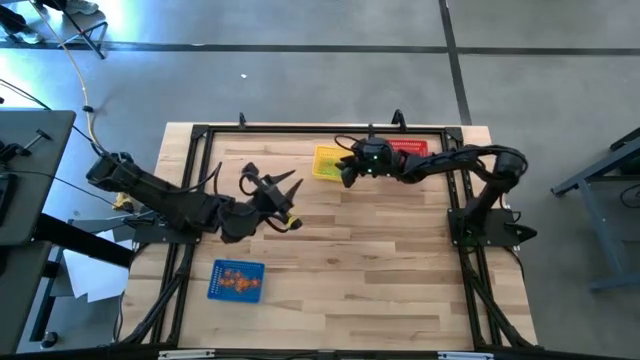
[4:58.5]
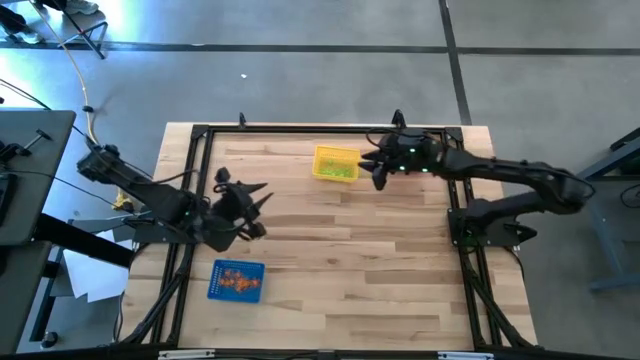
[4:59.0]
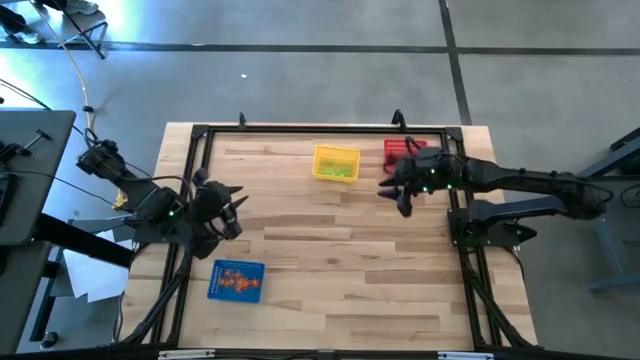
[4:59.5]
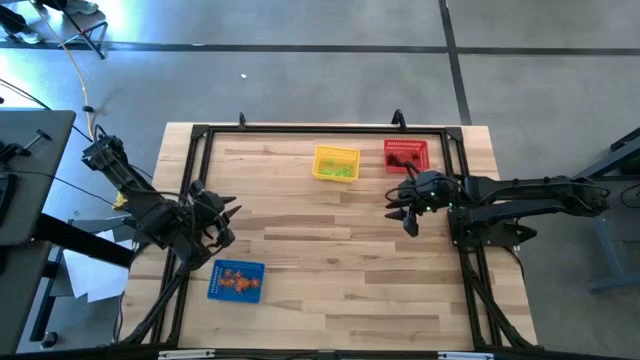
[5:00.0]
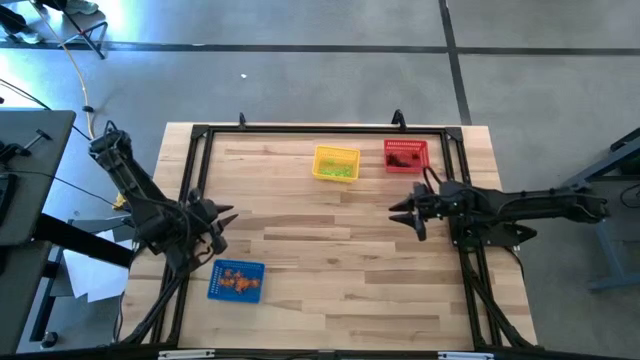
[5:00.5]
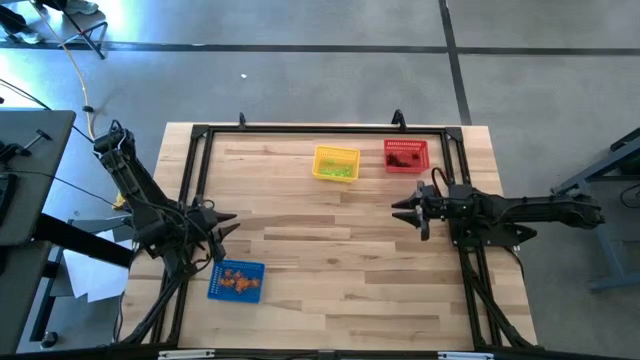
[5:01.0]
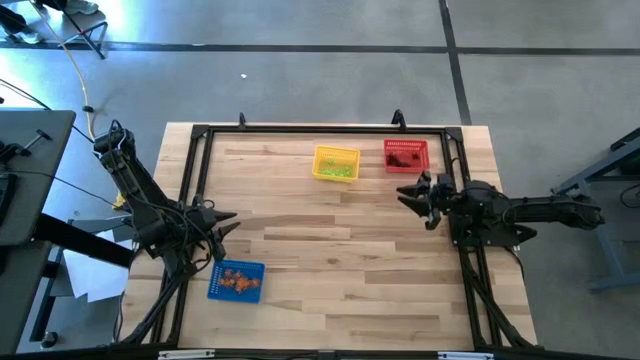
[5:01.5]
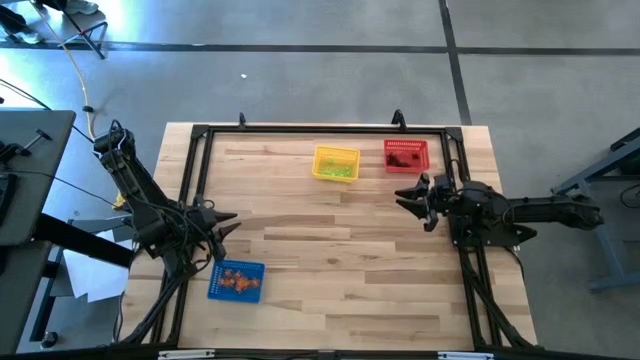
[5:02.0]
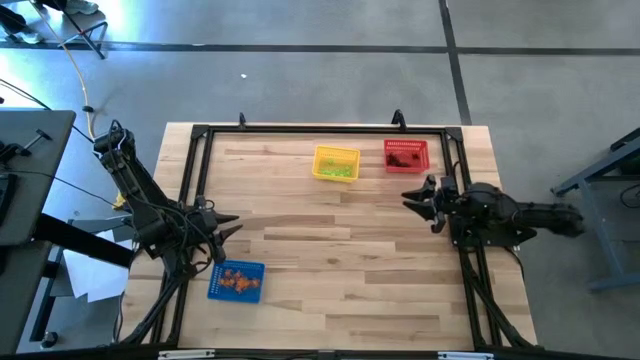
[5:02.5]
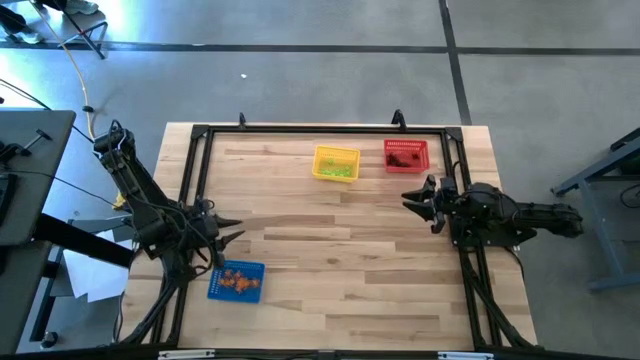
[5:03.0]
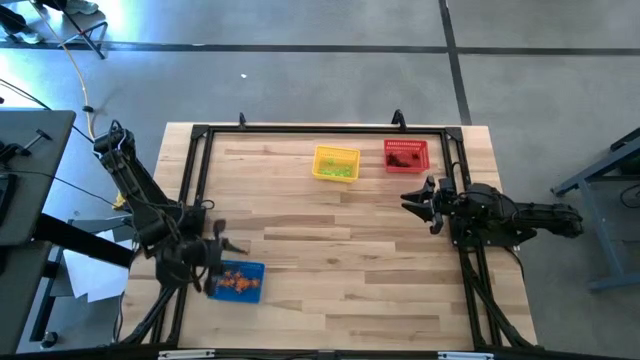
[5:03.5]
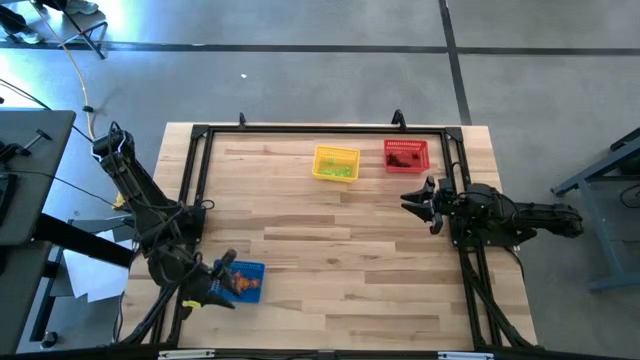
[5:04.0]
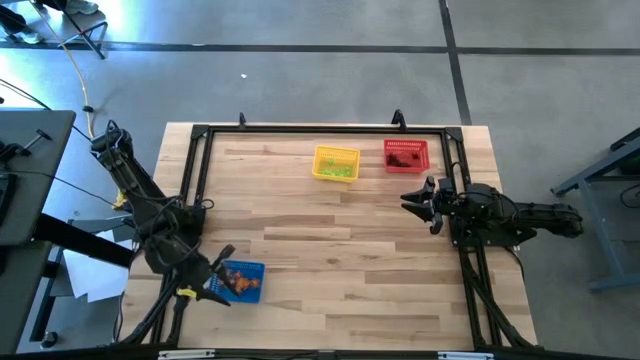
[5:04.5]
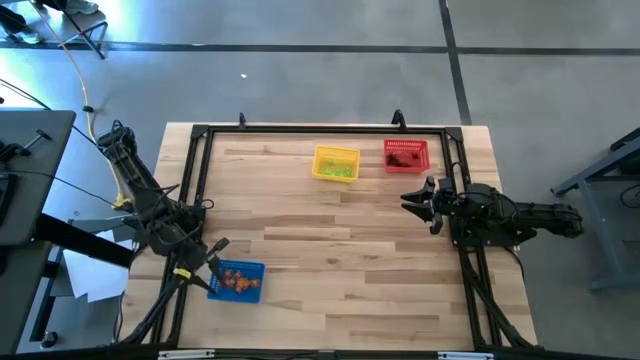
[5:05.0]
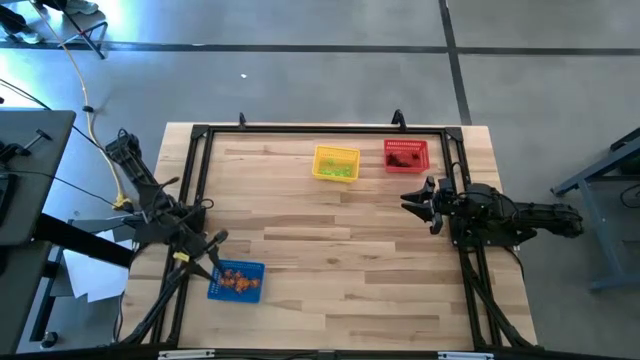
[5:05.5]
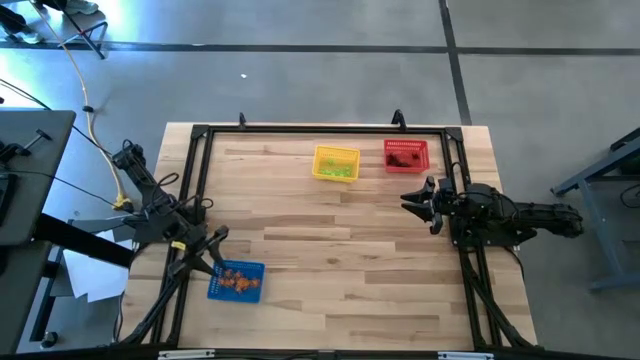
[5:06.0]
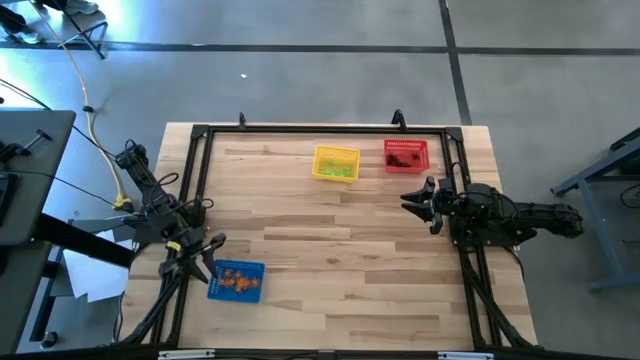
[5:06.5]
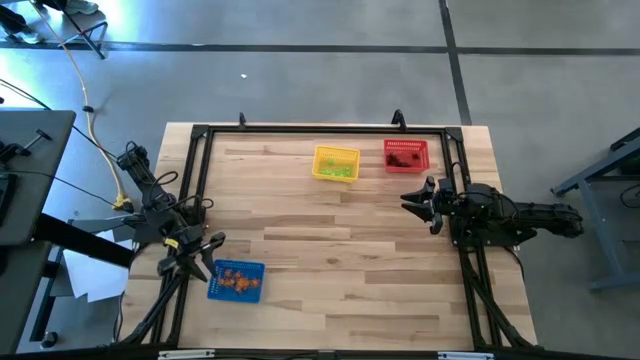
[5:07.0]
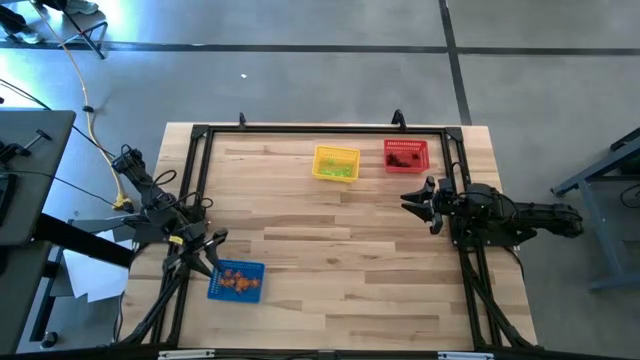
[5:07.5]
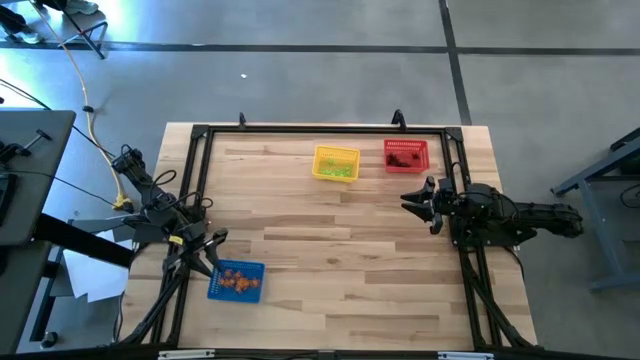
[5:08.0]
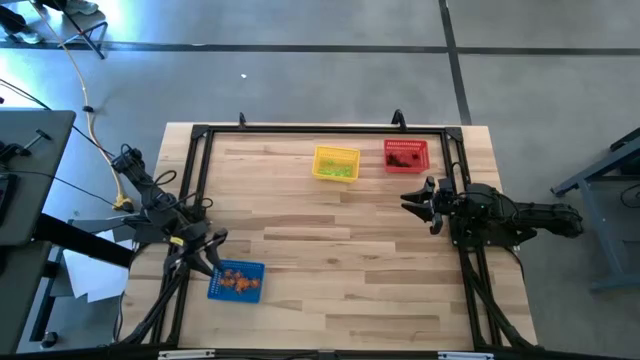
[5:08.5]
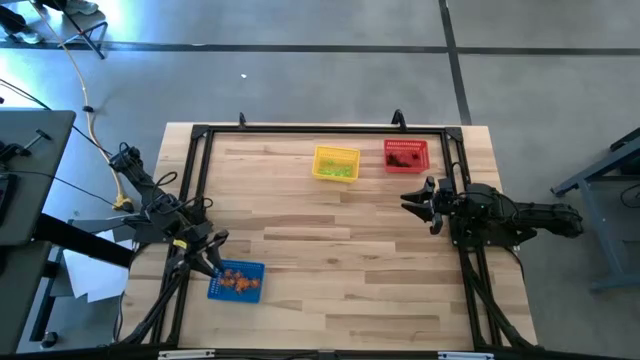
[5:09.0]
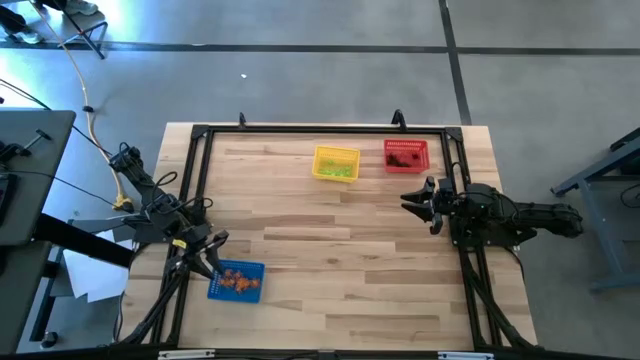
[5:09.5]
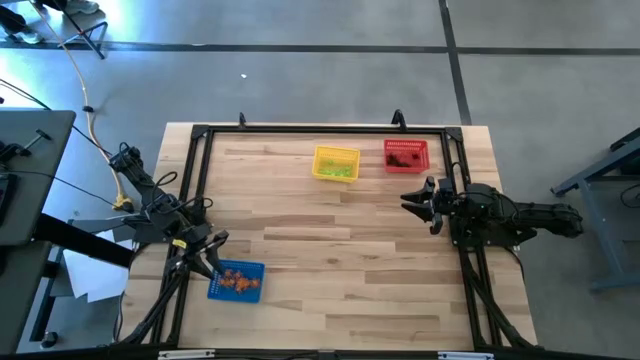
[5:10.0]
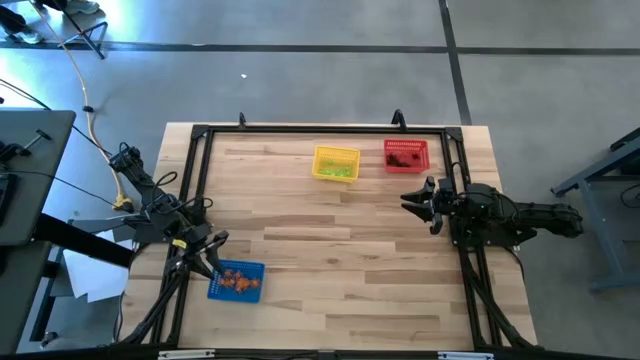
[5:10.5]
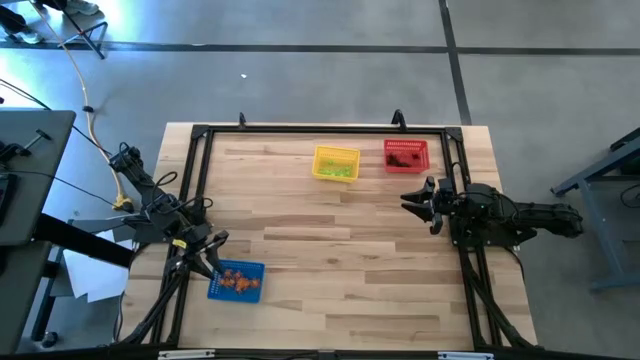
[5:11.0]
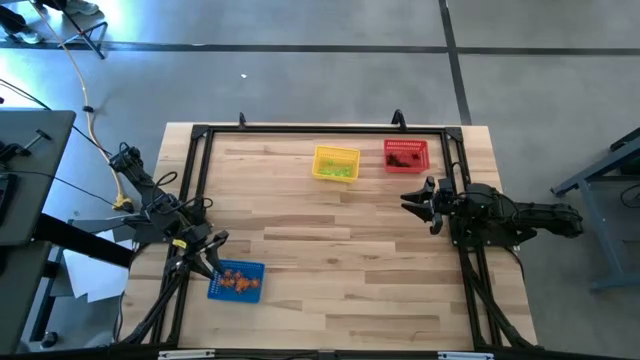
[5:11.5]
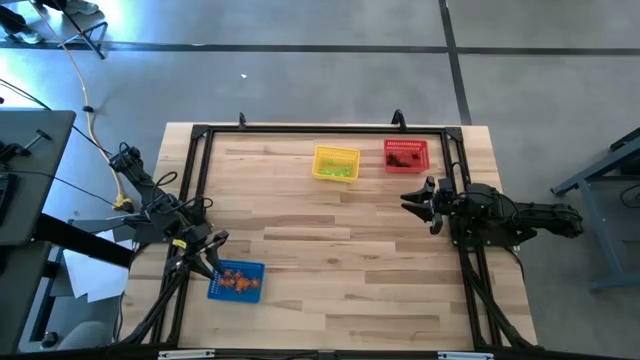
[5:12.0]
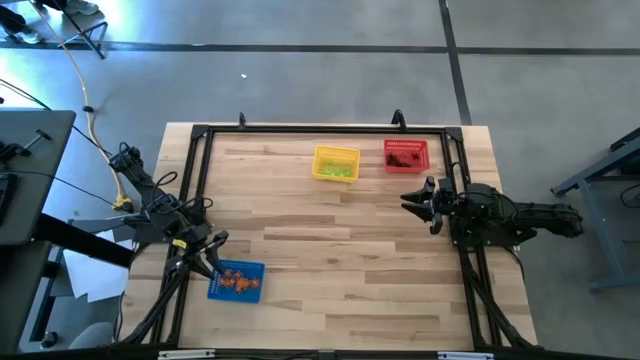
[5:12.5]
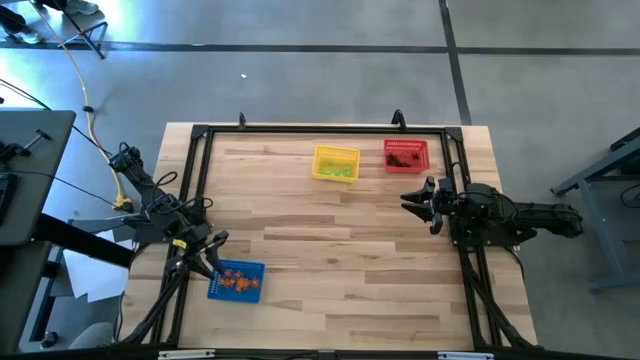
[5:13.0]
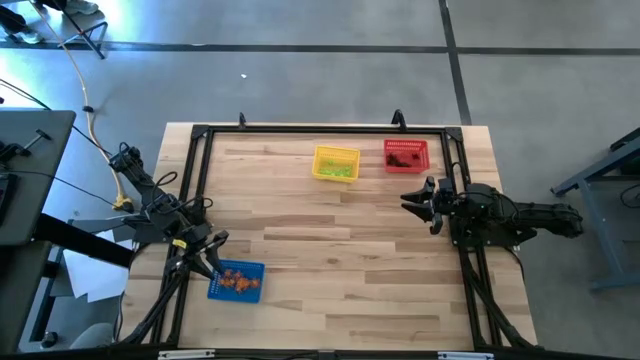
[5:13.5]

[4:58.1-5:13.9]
Task: Sort Halloween decoration
Return to Home Position

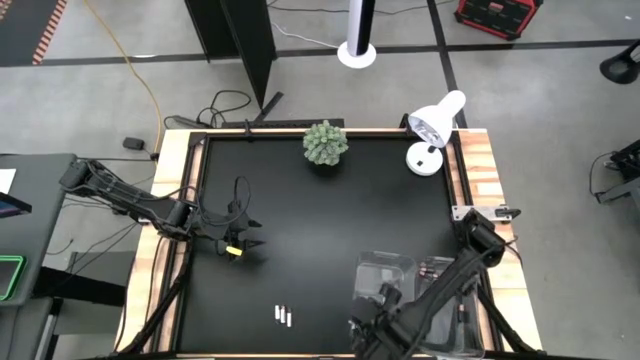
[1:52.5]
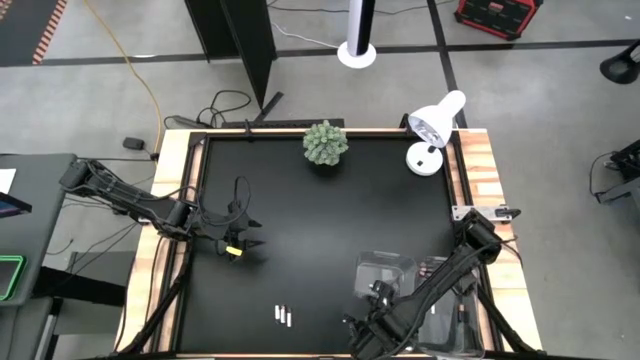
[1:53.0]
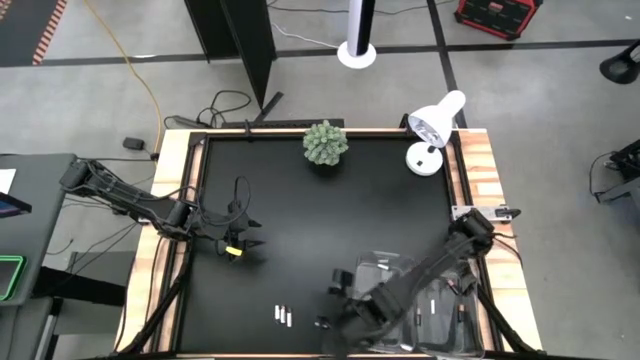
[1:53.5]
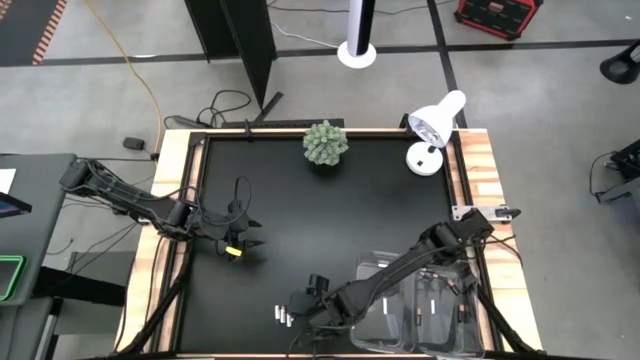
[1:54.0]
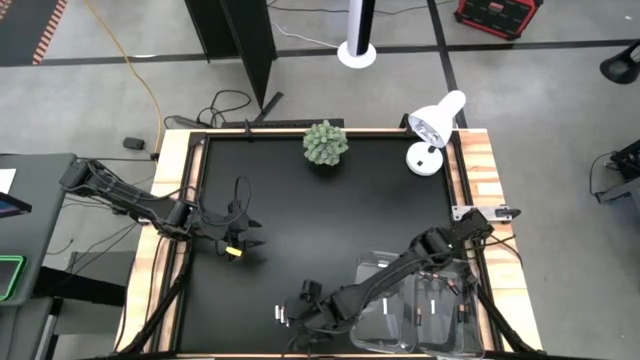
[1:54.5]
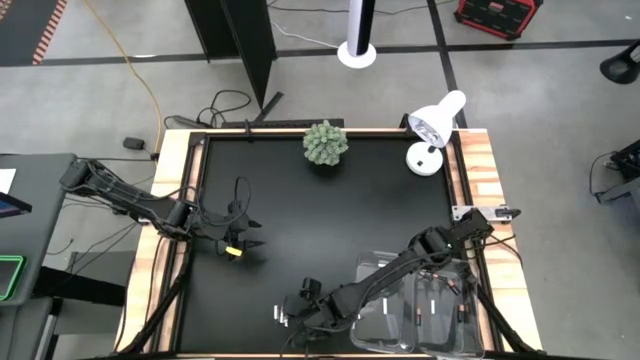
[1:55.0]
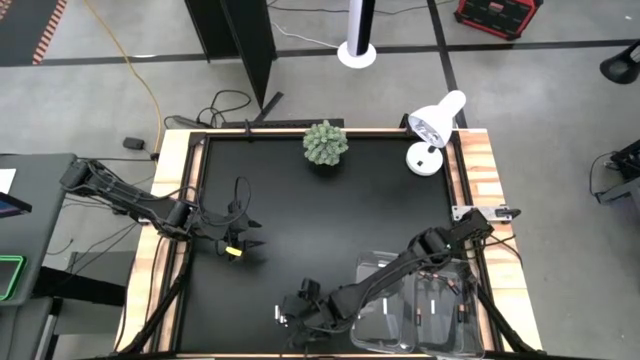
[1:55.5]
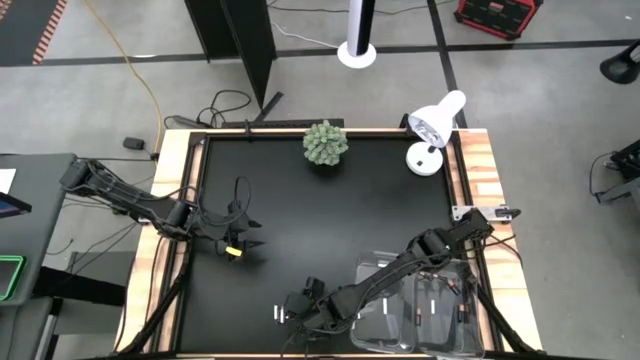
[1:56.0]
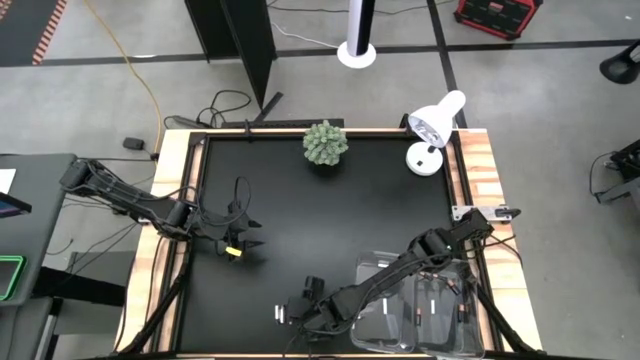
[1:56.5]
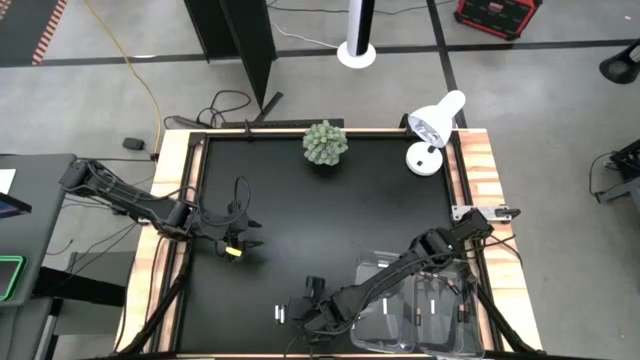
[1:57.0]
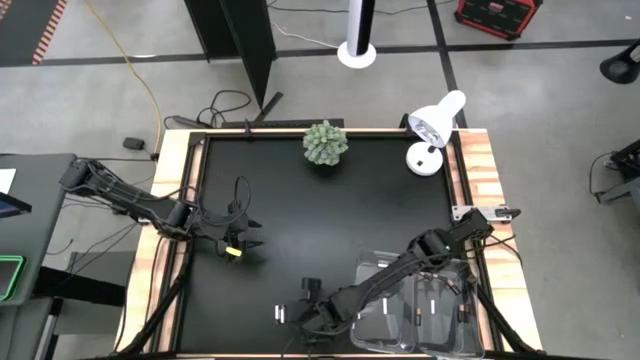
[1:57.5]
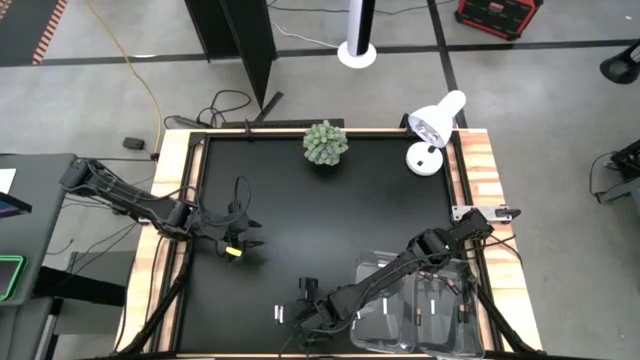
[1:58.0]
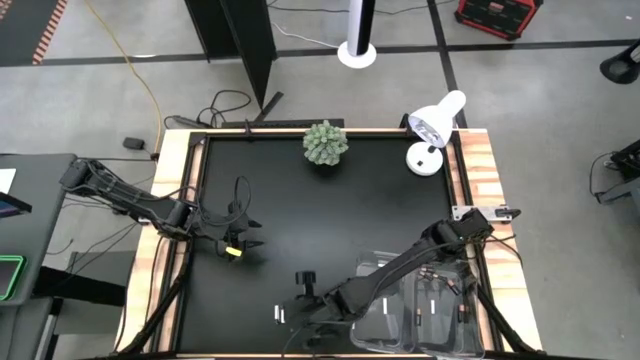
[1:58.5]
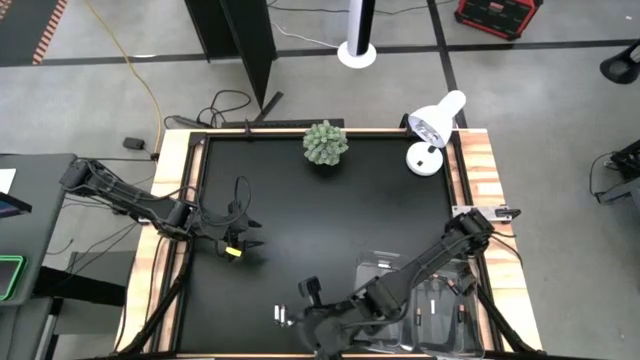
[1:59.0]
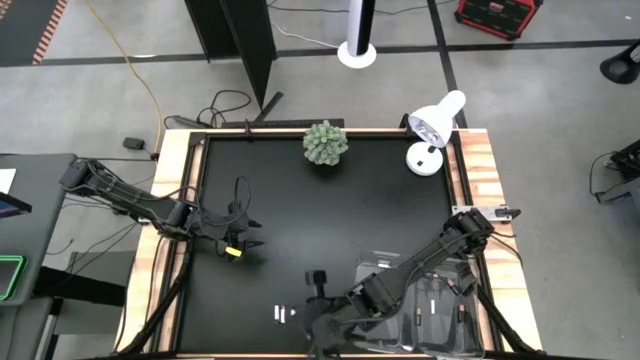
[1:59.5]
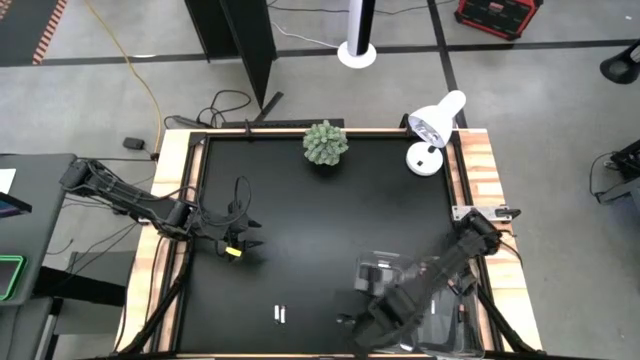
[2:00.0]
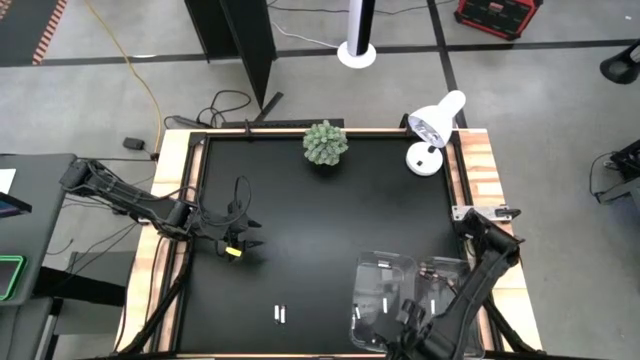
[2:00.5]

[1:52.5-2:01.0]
Task: Sort batteries
Put the silver battery into the left transparent bin
